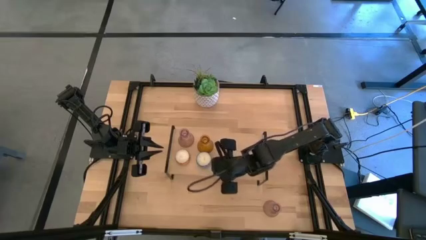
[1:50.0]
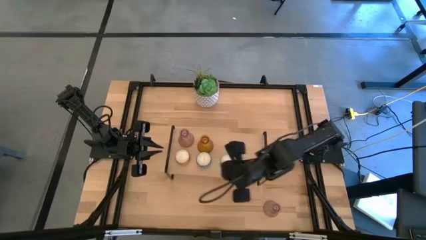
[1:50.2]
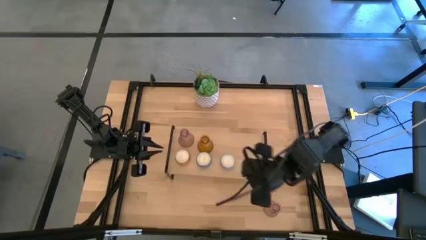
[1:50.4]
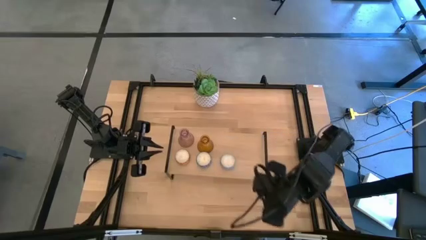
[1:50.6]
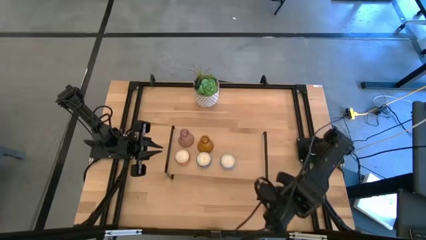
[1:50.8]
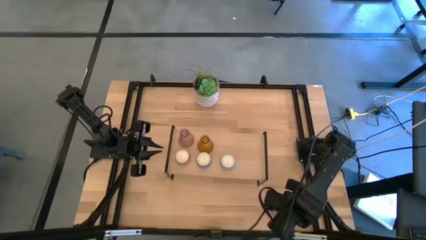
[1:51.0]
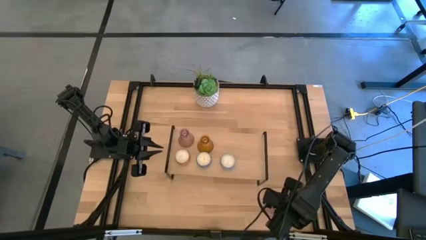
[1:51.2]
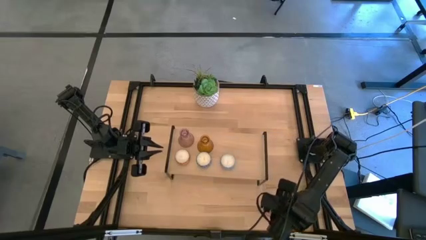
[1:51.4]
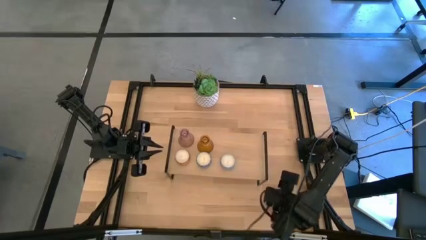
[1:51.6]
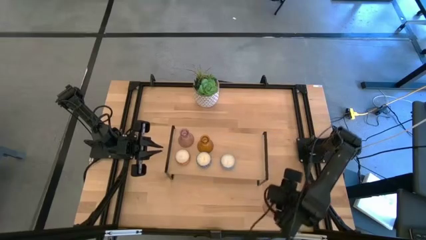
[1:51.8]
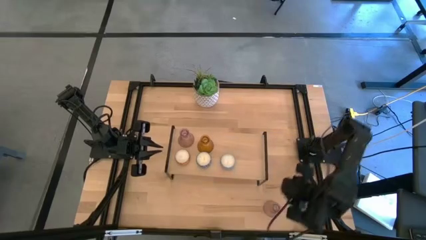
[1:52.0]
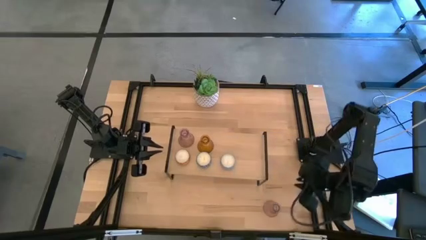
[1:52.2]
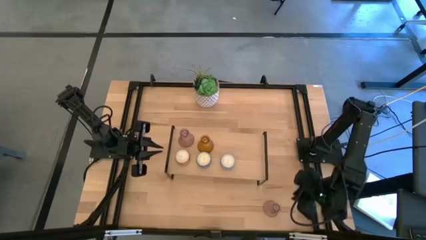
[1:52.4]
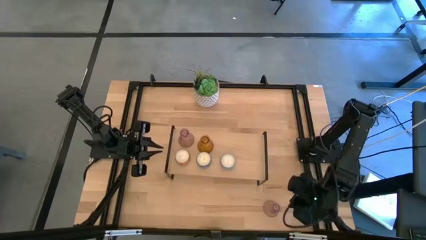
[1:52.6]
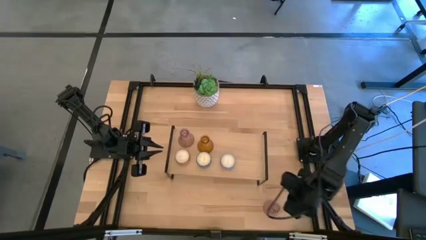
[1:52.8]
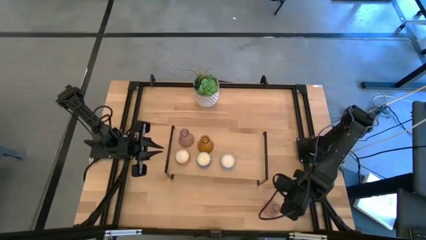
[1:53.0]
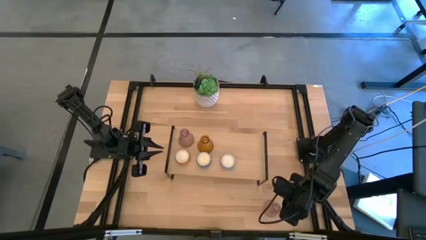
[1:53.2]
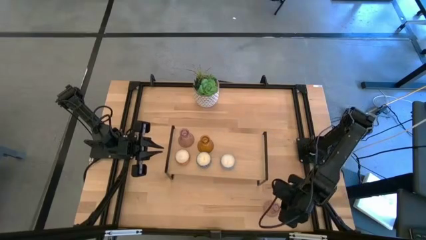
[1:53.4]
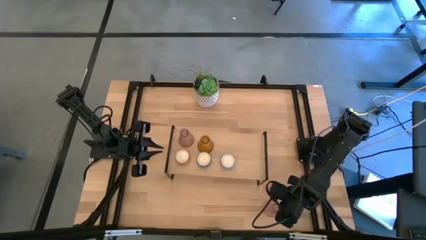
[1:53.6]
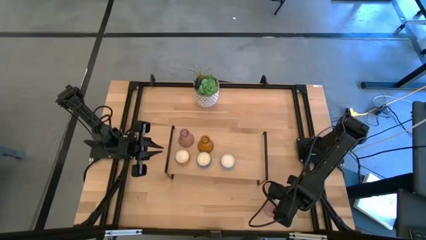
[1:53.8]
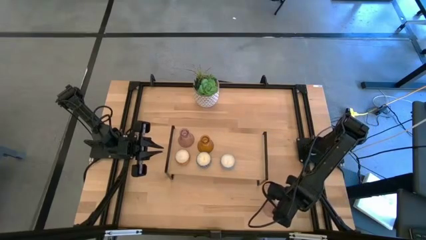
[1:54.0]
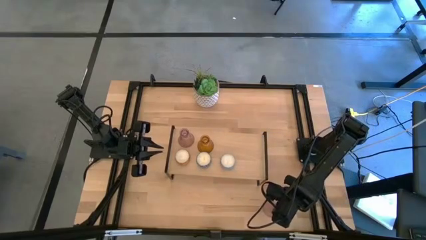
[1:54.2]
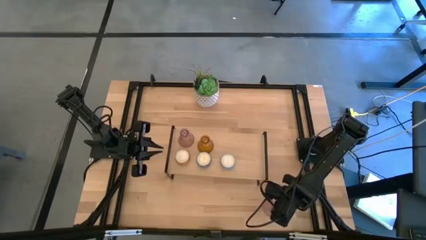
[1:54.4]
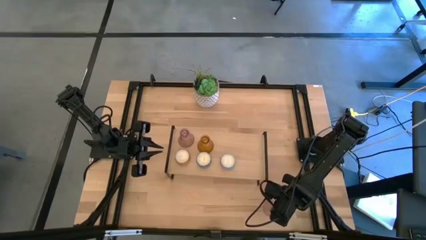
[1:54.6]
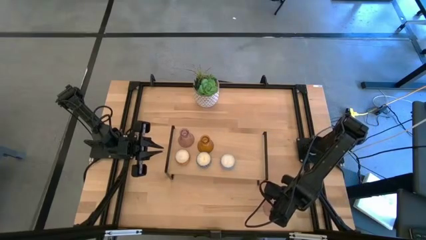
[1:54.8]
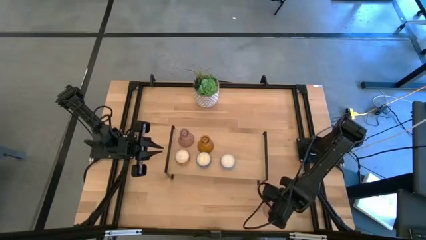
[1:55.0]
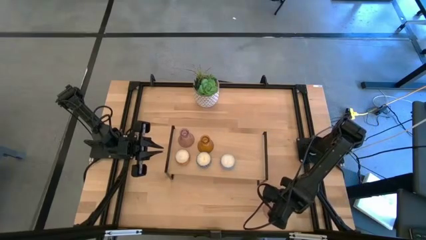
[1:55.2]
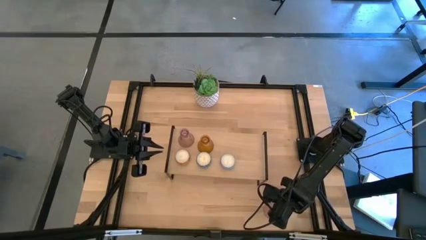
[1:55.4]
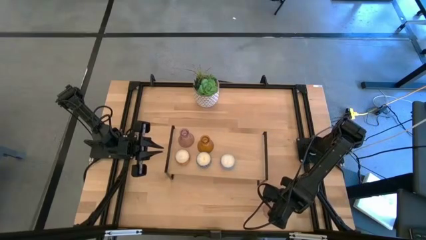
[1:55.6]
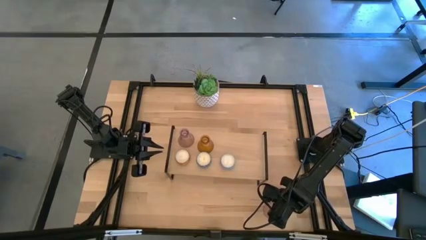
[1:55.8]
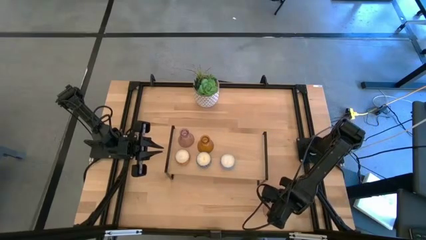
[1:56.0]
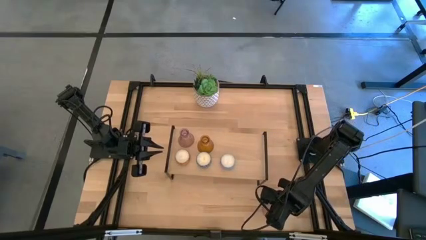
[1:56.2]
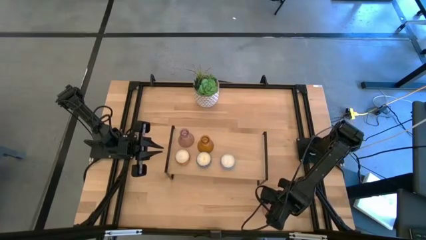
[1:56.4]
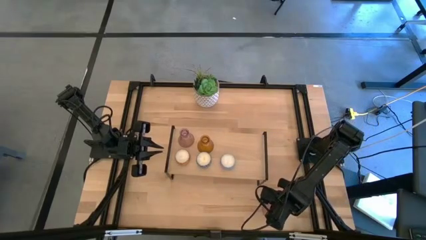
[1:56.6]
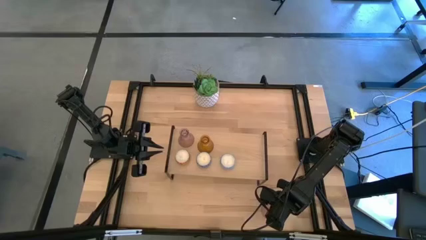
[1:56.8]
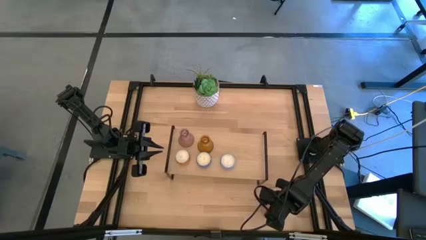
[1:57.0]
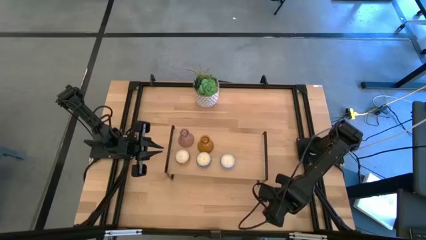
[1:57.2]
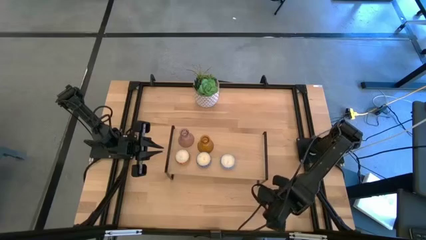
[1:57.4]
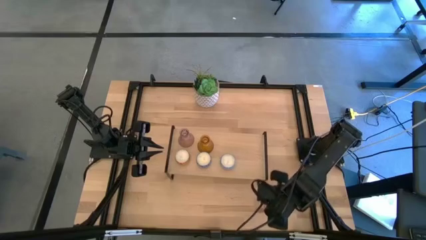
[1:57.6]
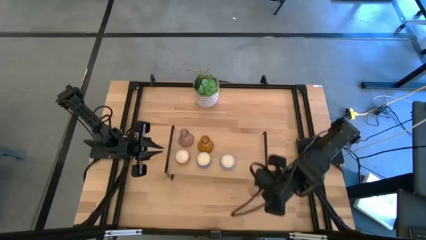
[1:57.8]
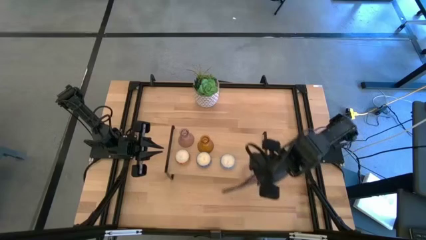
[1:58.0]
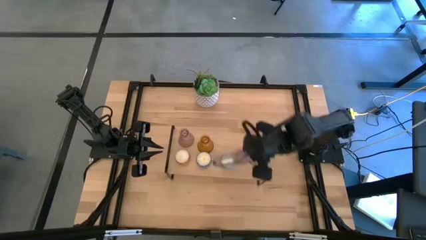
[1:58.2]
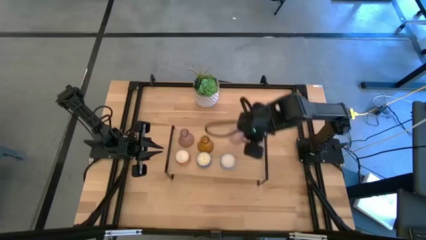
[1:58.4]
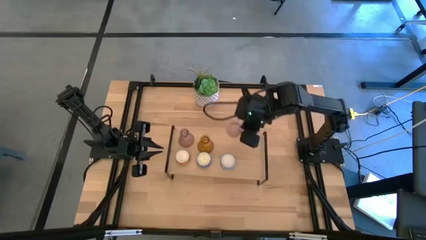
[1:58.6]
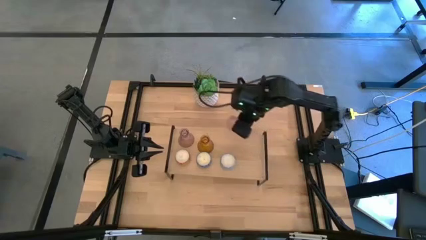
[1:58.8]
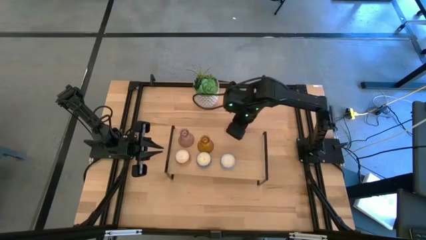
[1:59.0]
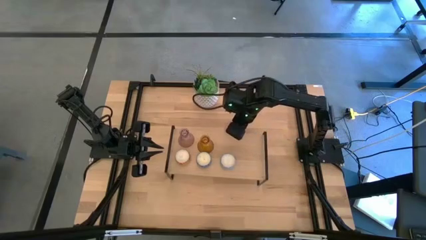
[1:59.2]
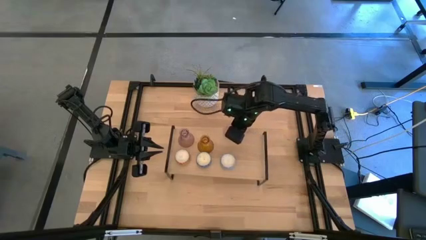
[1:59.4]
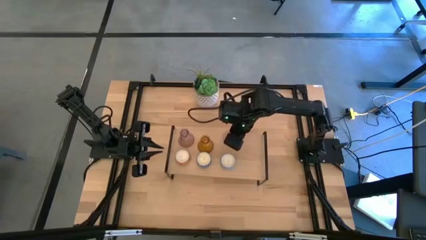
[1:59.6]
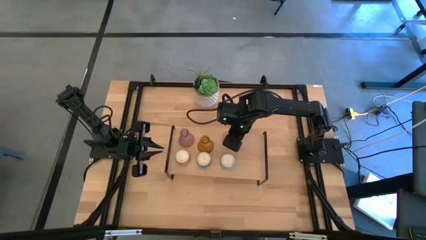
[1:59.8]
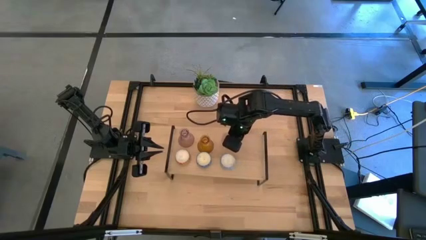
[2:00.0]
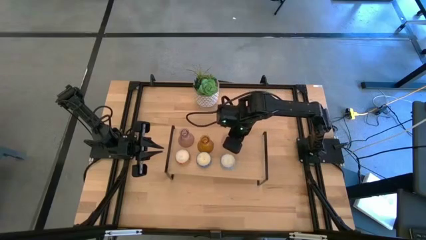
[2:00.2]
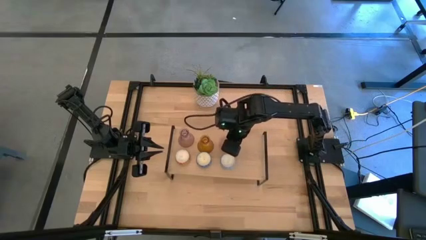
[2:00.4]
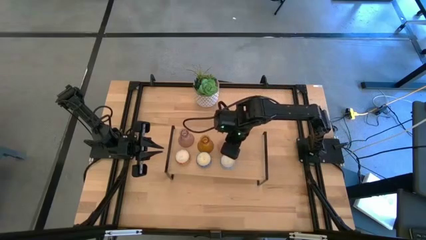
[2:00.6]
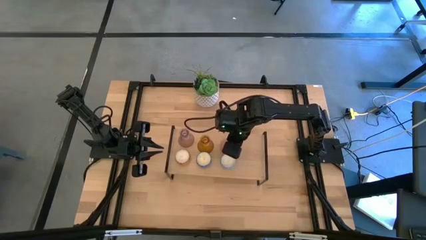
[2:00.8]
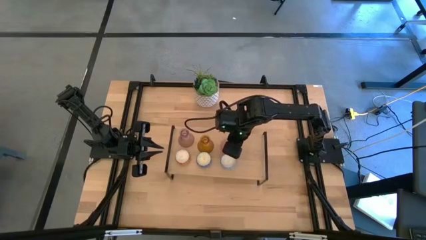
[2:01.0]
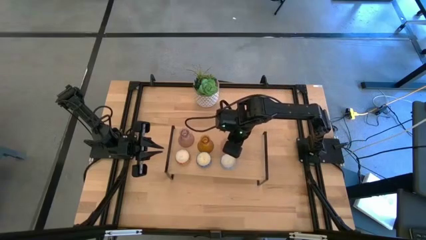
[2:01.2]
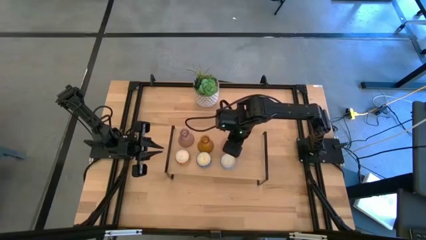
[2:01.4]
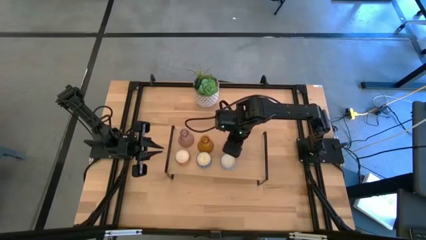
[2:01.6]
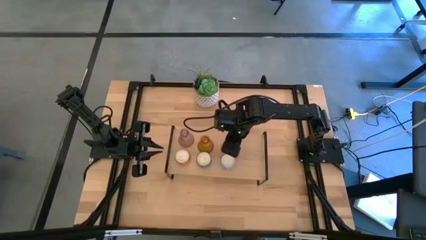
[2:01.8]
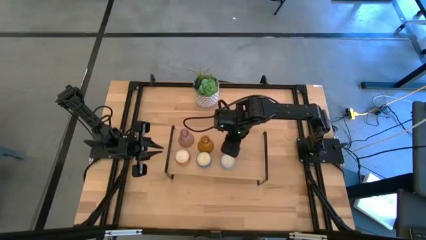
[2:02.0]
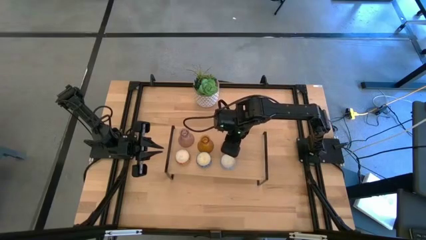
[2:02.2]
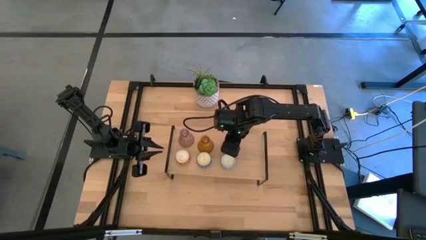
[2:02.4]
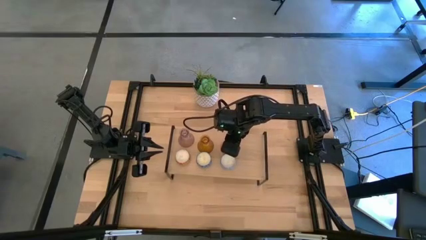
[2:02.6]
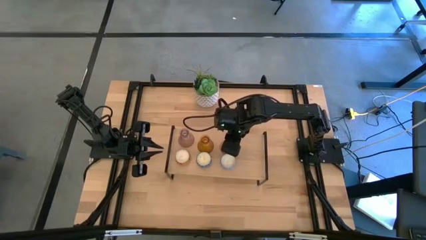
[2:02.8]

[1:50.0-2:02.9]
Task: Pick & Place candle stick holders
Put the pink glass candle holder on the shelf
